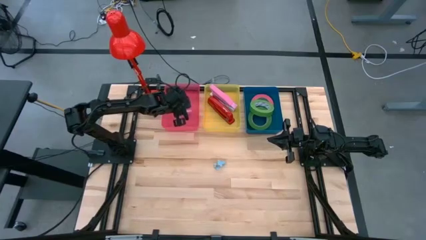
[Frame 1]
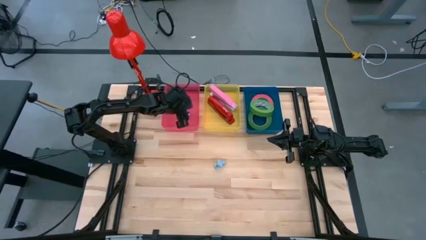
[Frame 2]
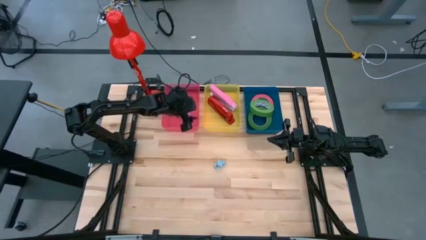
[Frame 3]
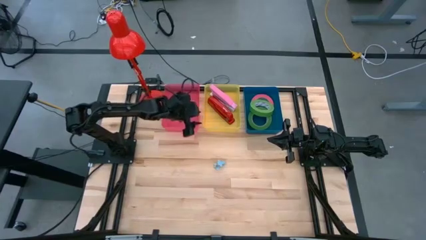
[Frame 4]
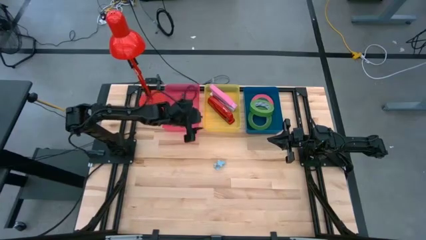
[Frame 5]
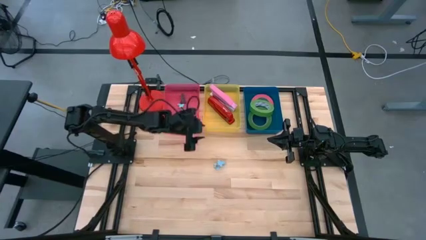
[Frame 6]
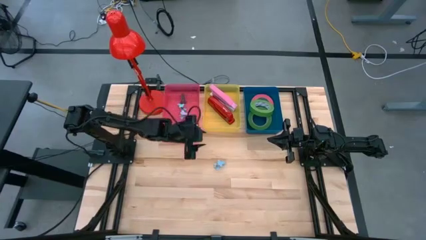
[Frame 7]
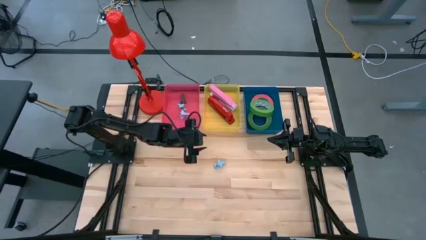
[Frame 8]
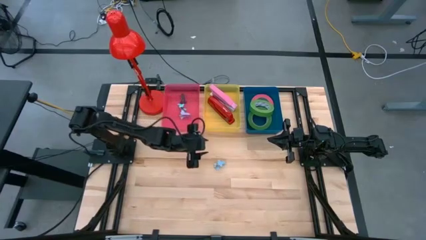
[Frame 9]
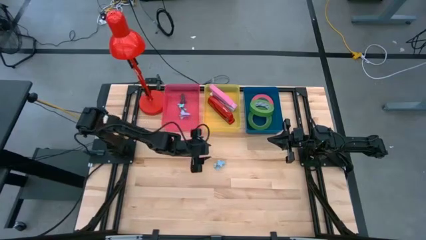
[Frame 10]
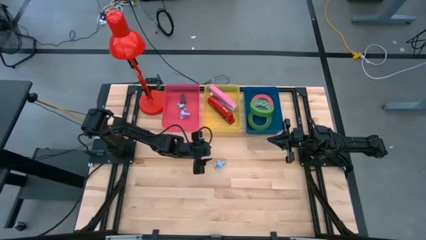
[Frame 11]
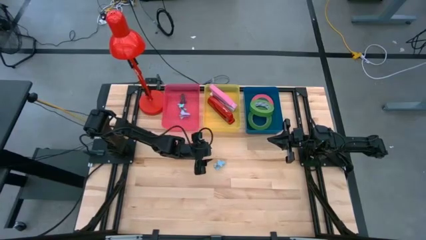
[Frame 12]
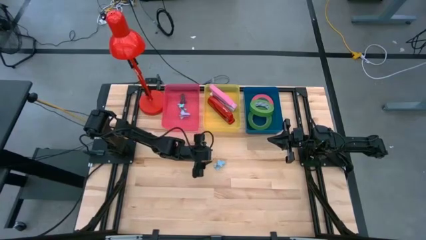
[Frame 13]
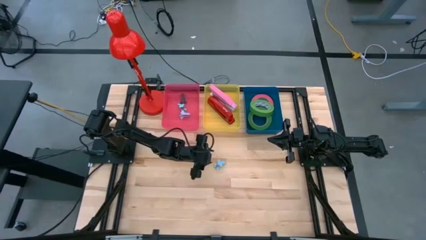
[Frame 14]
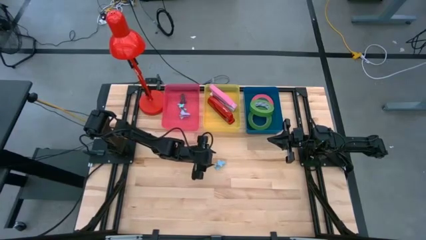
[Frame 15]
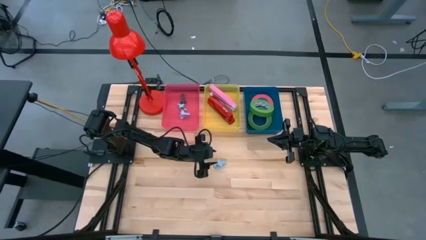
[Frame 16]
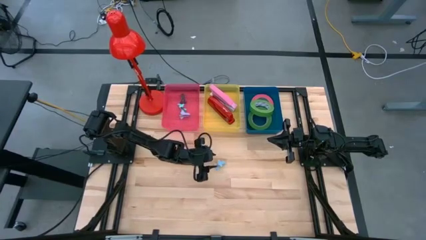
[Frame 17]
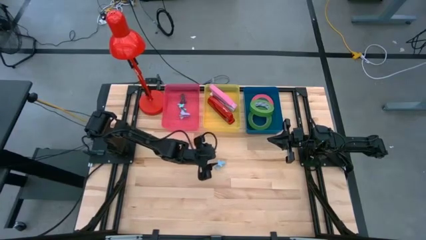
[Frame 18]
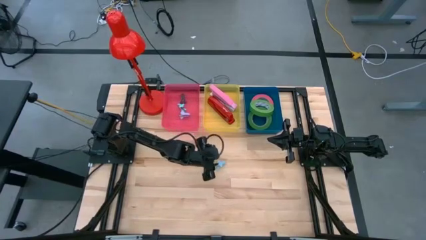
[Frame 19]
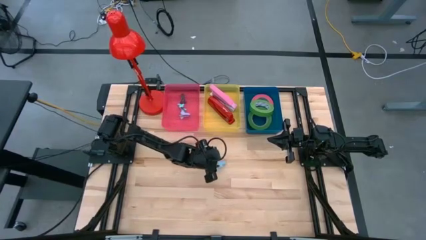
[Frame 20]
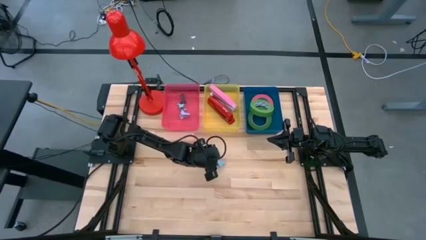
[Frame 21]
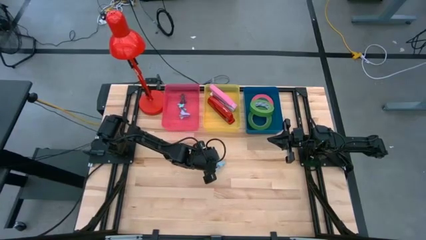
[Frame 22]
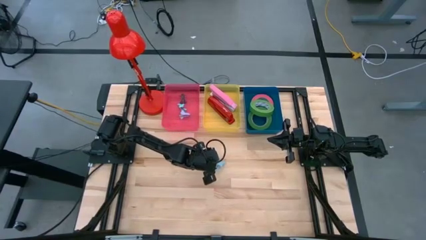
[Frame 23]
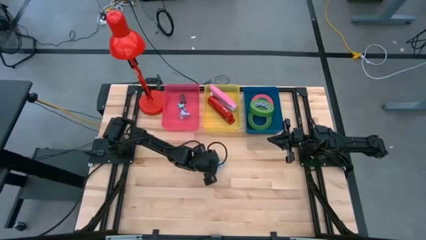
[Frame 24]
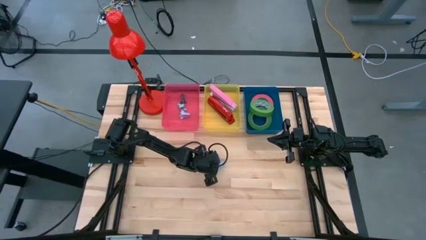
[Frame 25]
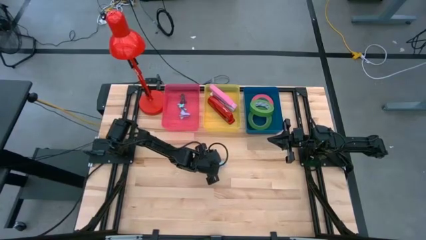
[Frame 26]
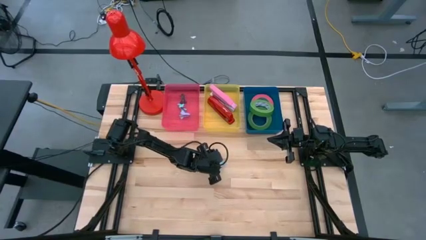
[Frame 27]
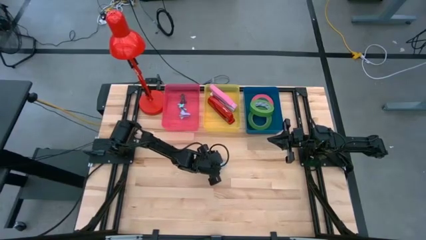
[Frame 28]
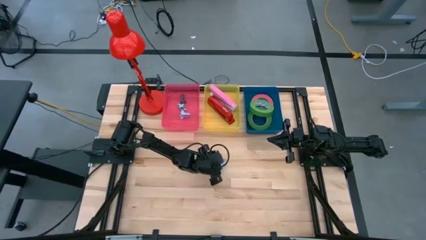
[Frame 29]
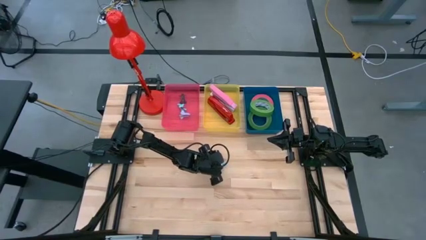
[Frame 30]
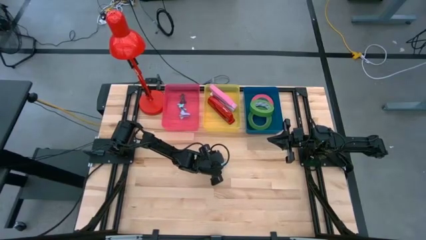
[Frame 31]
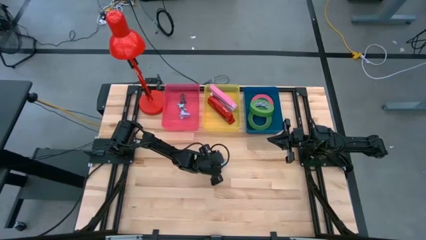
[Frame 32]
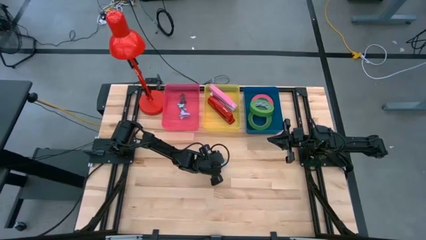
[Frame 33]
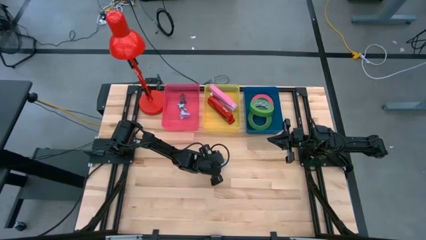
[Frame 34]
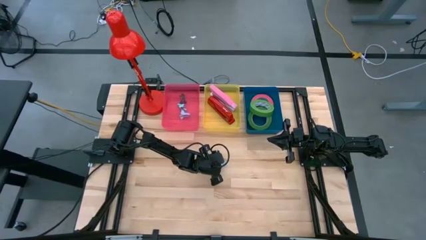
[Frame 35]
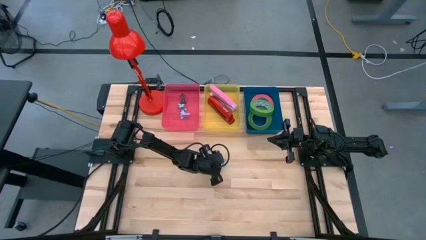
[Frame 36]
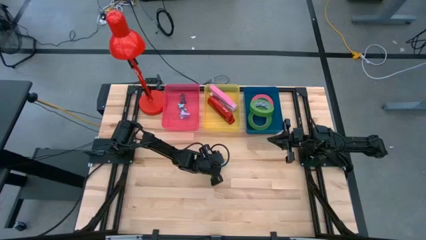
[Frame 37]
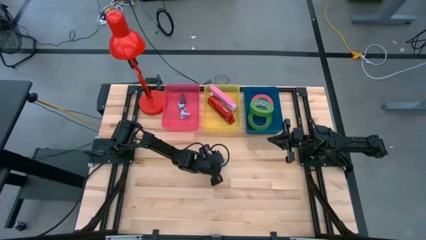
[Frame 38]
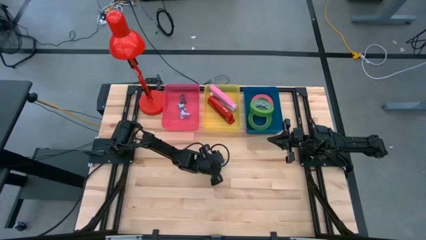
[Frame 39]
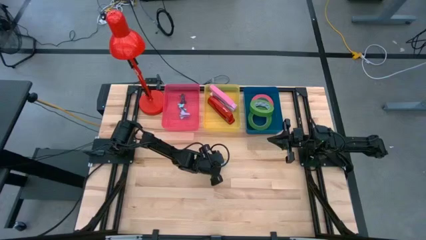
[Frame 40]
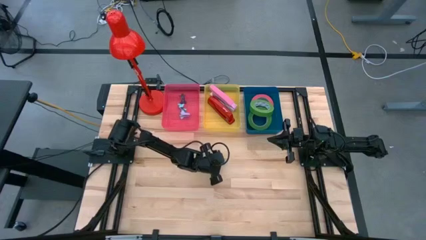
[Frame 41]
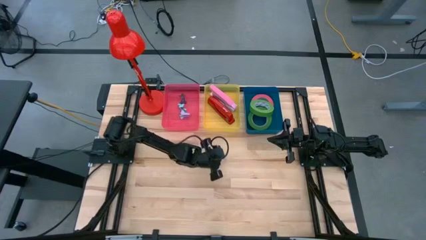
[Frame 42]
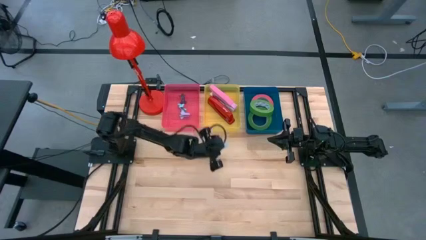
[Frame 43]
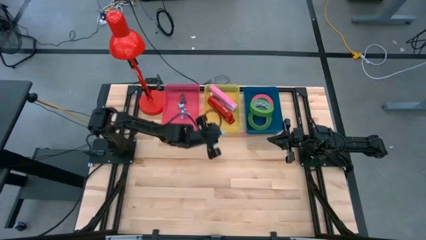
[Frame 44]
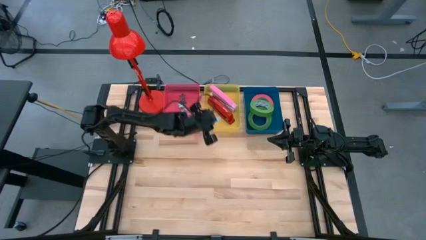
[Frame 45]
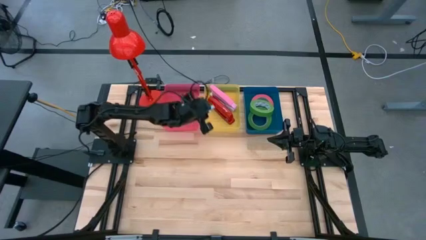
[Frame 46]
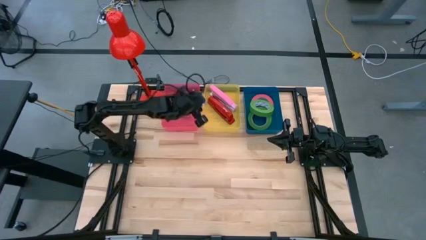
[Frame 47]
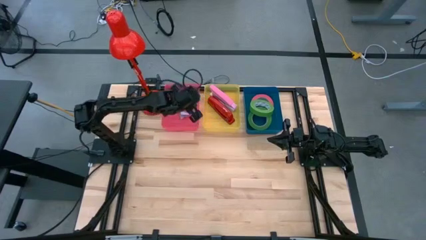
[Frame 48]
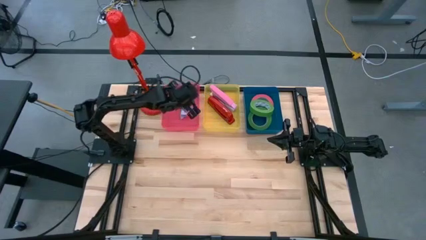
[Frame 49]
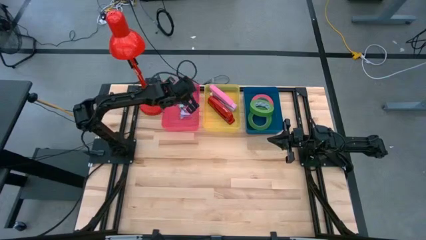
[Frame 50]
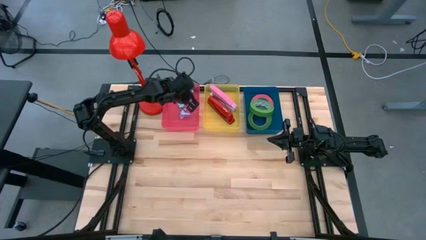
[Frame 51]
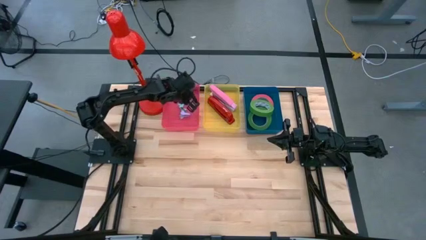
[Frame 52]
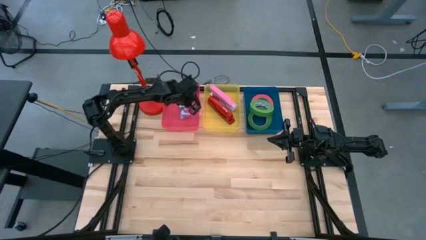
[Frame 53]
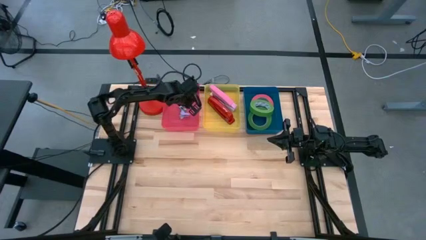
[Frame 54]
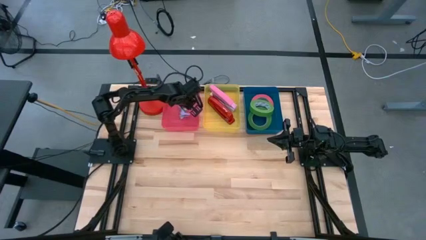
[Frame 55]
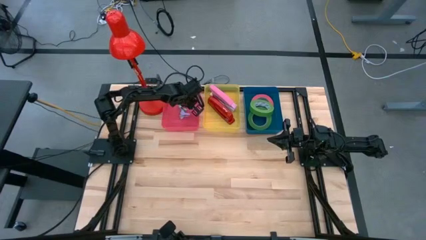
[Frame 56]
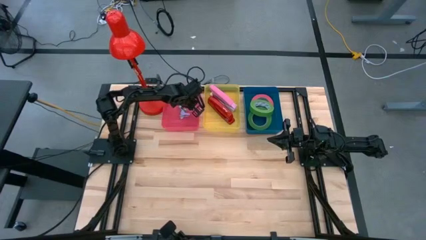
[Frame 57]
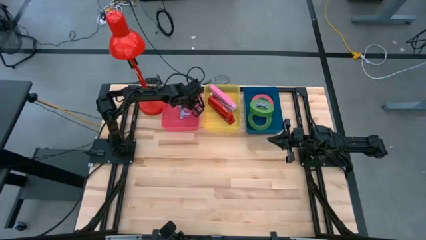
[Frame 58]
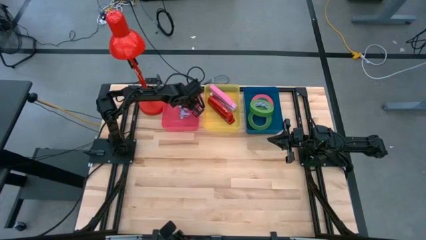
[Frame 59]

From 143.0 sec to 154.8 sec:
Task: Pick and place Stapler, Stapler remover, tape
Put the blue staple remover into the pink bin
